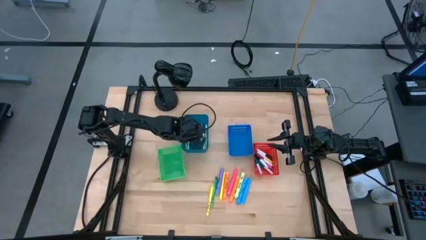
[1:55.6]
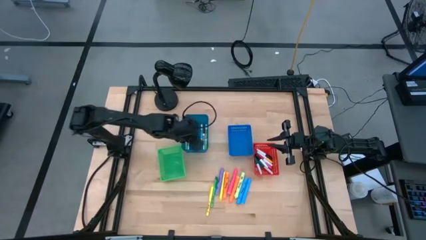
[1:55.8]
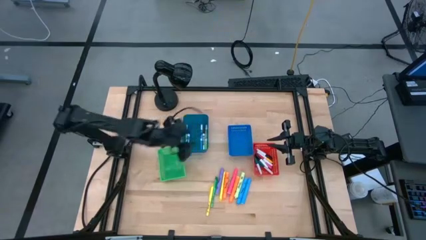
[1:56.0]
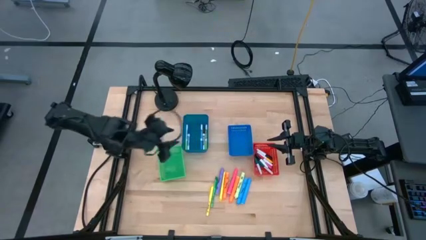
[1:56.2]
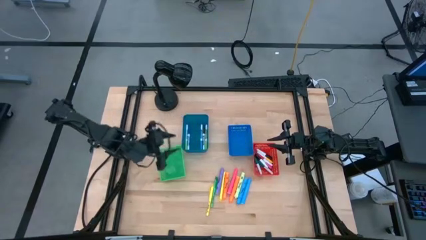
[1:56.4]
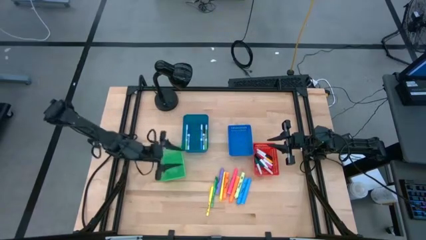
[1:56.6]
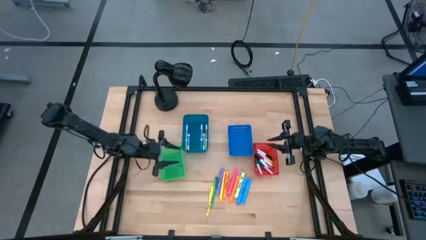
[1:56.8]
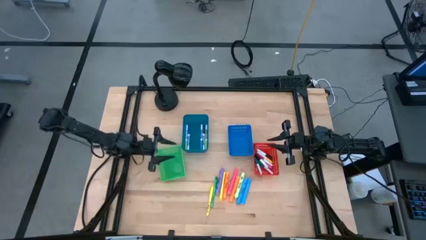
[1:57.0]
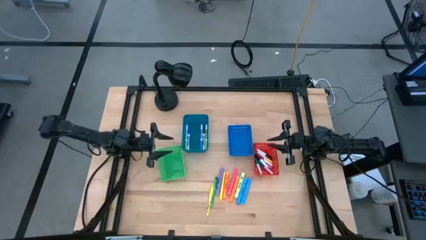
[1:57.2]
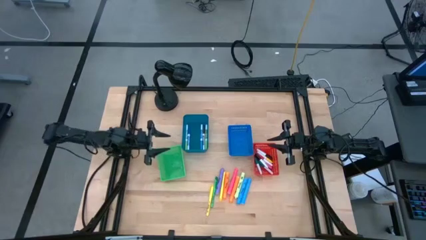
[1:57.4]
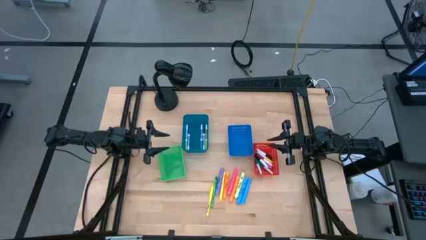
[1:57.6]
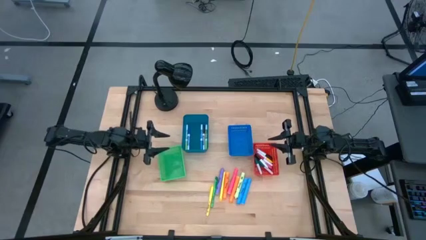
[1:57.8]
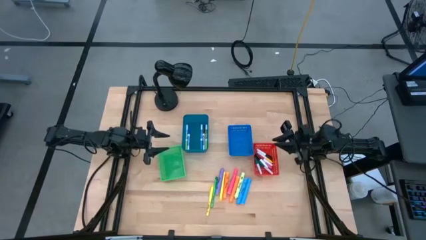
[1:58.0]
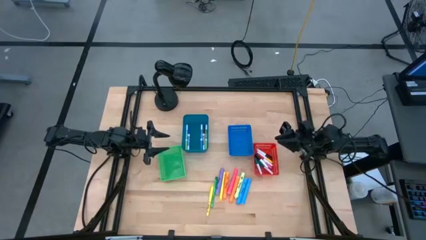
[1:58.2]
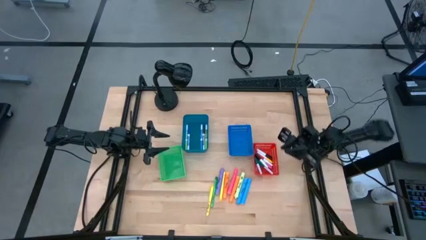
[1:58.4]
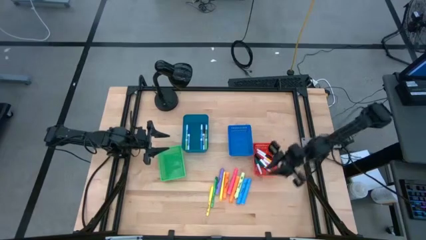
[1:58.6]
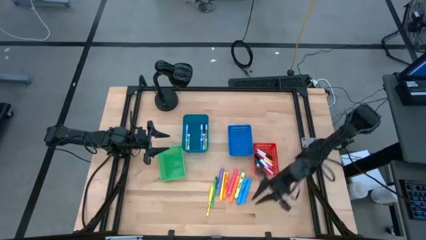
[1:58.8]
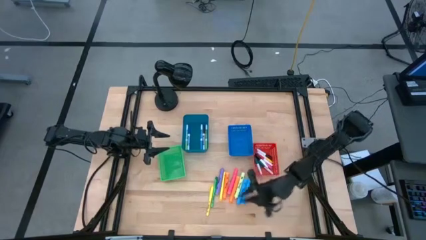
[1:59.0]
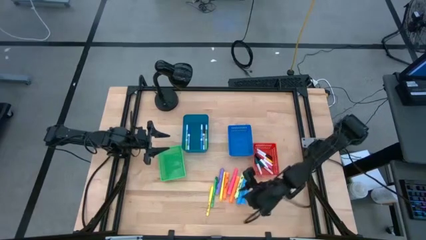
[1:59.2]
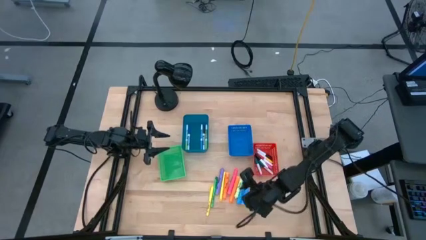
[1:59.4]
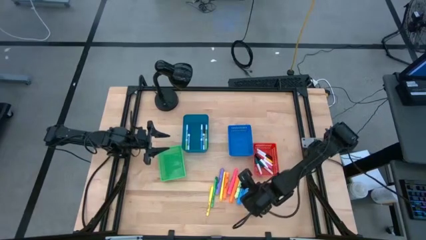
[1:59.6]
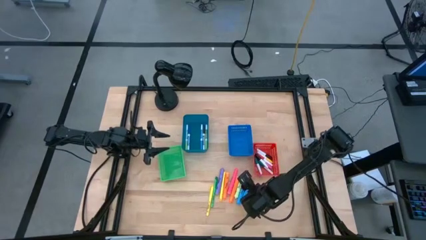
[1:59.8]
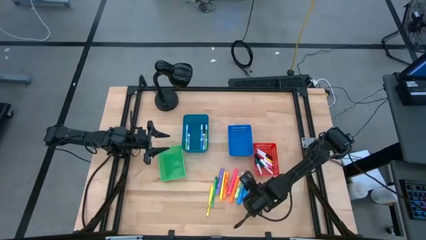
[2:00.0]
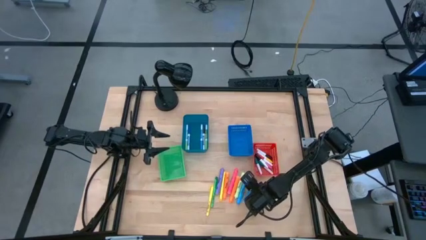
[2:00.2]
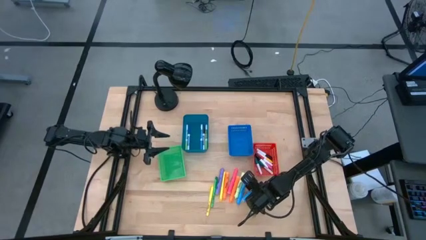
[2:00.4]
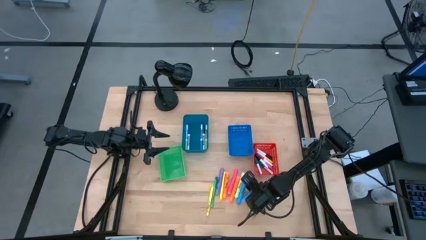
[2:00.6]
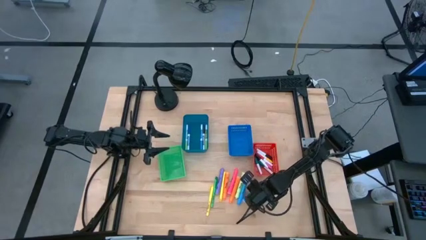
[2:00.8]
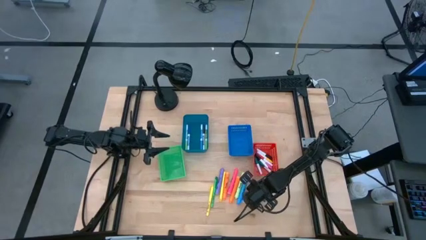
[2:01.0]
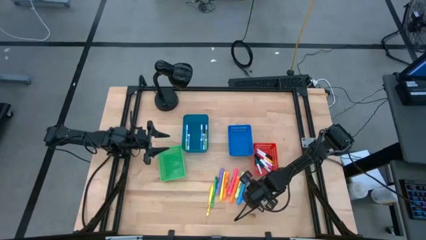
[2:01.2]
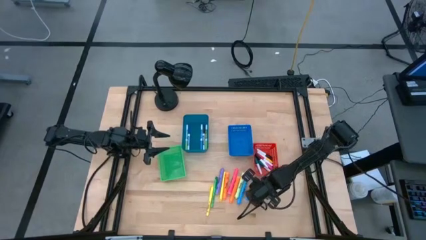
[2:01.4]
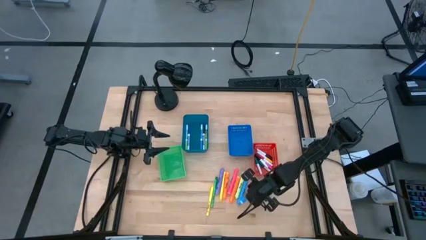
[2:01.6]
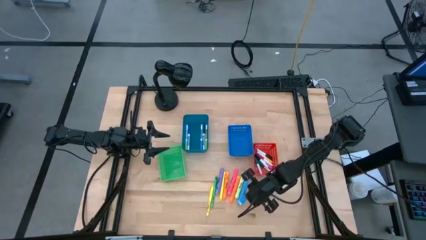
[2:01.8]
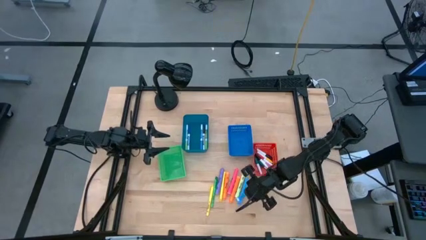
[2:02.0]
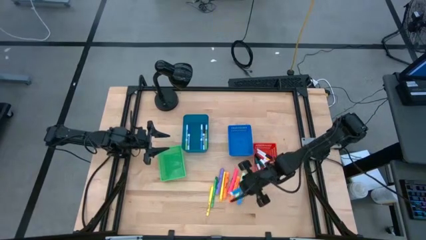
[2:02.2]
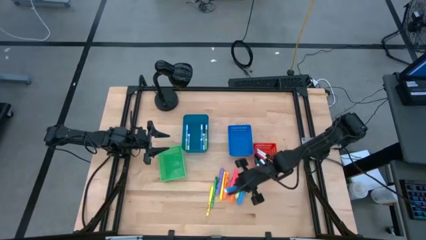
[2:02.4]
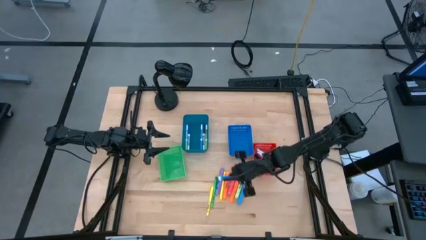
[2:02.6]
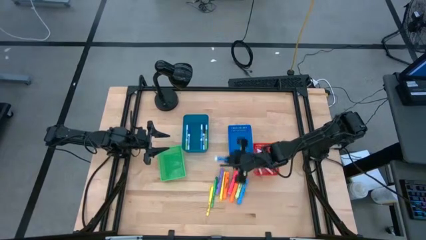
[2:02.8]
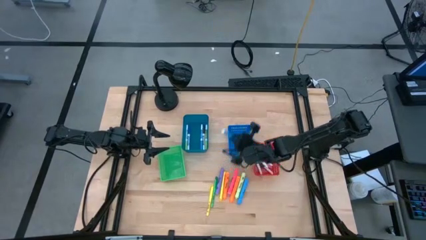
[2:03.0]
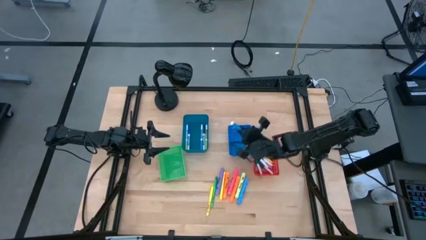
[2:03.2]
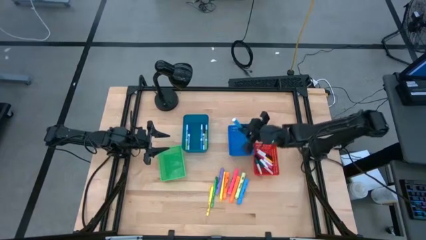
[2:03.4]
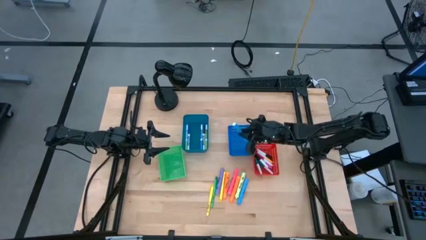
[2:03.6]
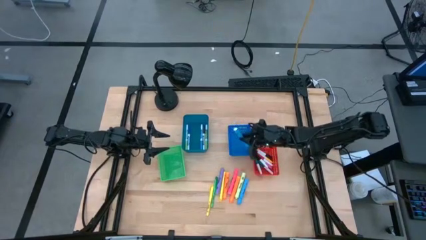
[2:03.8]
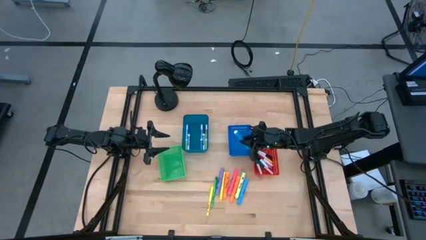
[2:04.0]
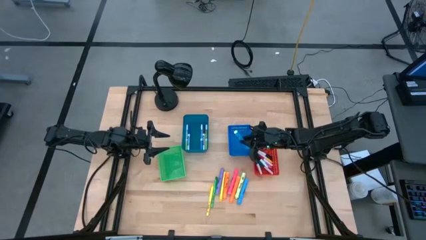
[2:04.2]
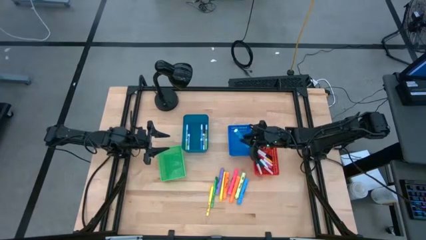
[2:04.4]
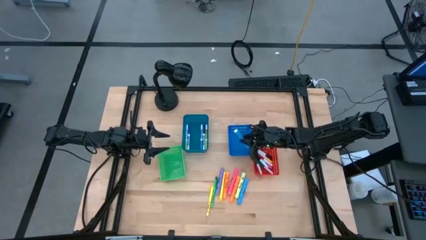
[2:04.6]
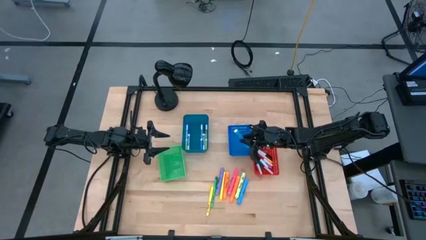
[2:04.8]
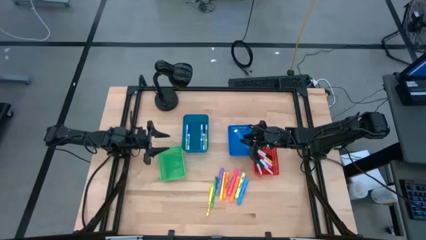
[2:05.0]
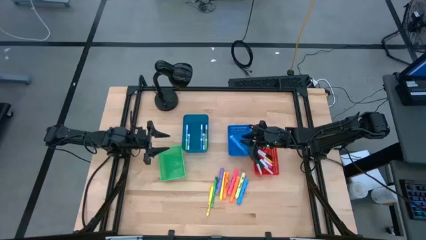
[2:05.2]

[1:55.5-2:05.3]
Task: Pick & Place Markers
Put the right blue highlighter pen into the blue bin

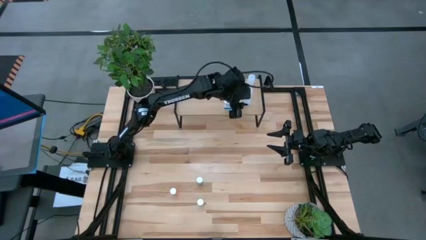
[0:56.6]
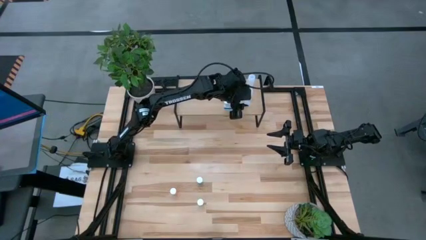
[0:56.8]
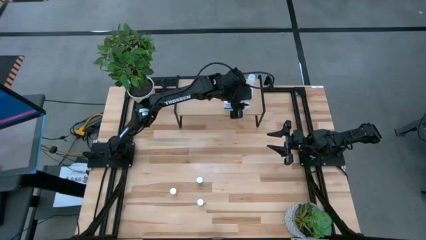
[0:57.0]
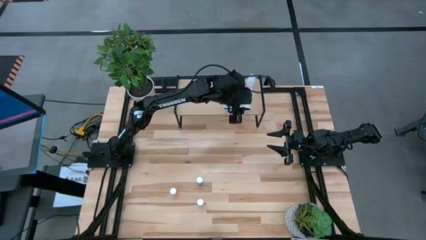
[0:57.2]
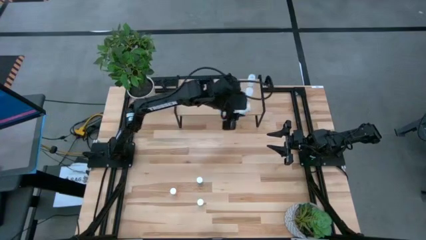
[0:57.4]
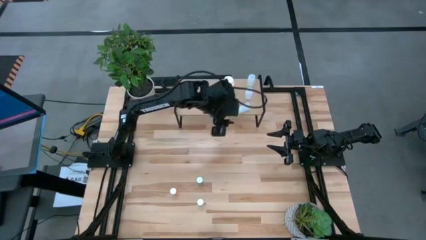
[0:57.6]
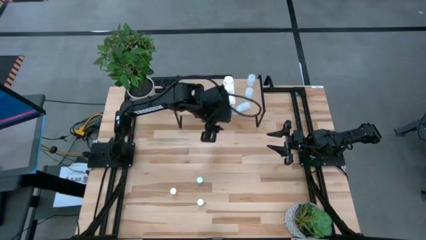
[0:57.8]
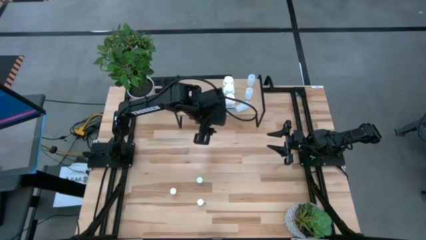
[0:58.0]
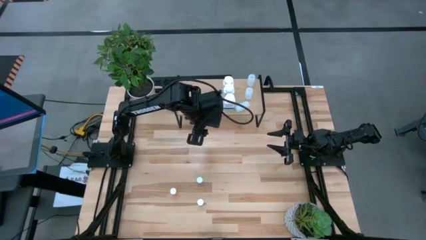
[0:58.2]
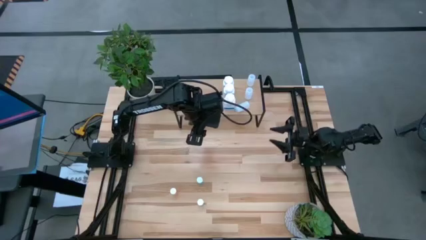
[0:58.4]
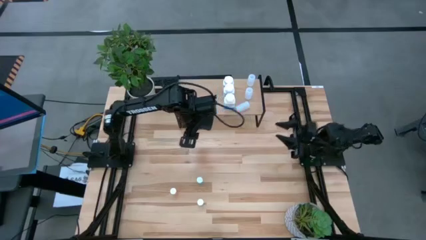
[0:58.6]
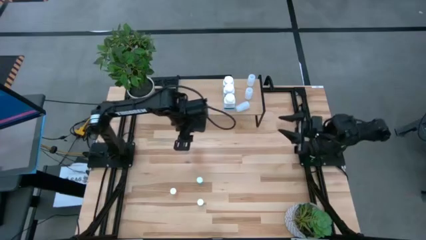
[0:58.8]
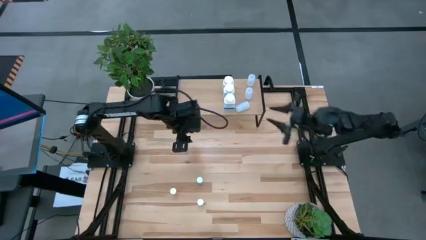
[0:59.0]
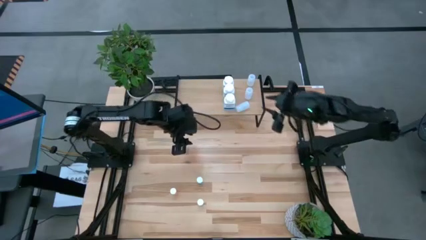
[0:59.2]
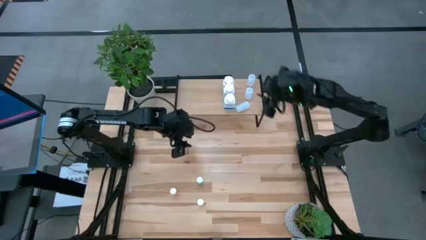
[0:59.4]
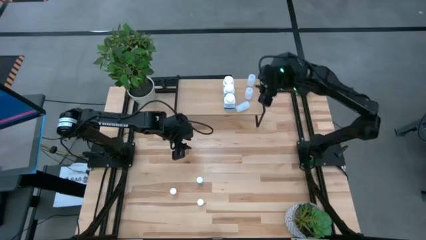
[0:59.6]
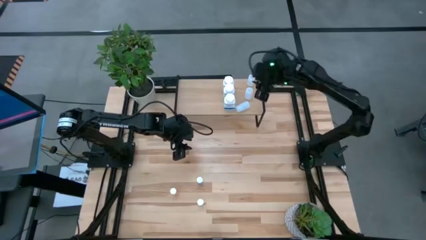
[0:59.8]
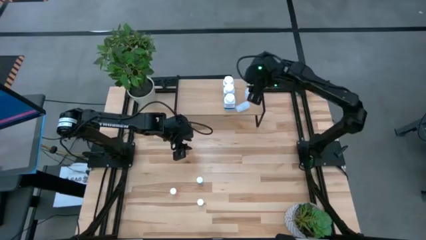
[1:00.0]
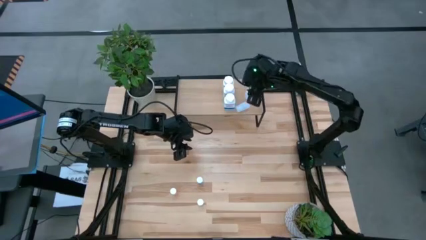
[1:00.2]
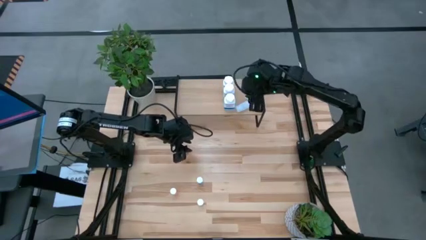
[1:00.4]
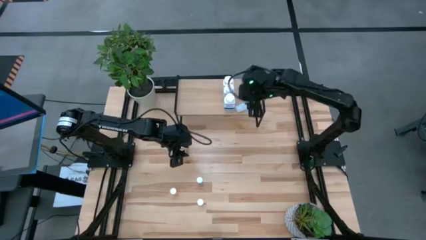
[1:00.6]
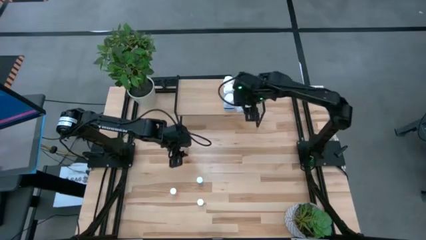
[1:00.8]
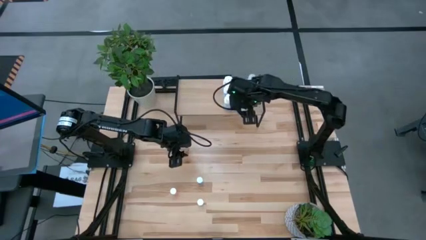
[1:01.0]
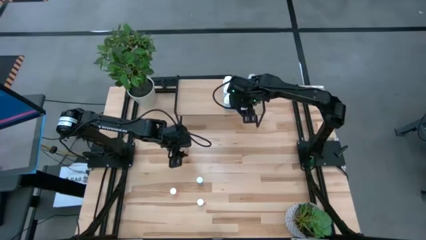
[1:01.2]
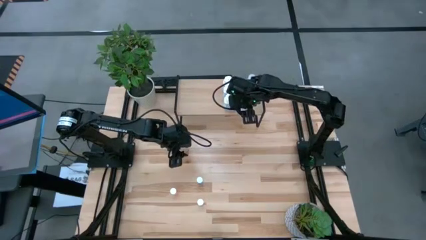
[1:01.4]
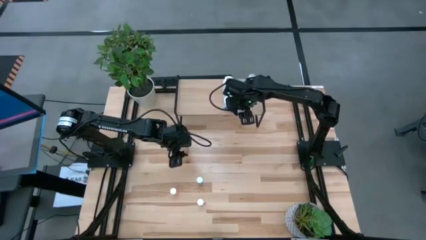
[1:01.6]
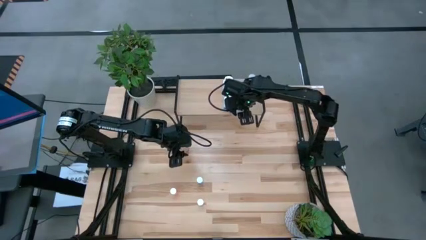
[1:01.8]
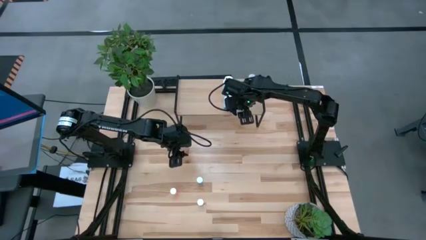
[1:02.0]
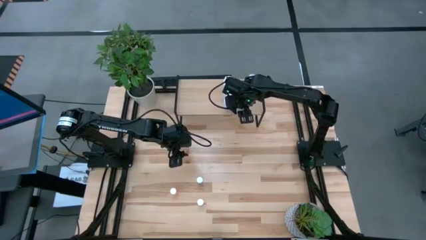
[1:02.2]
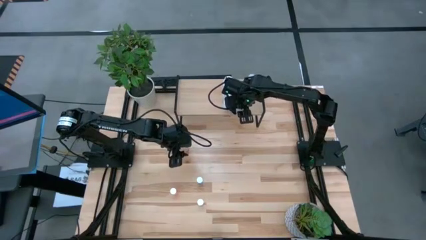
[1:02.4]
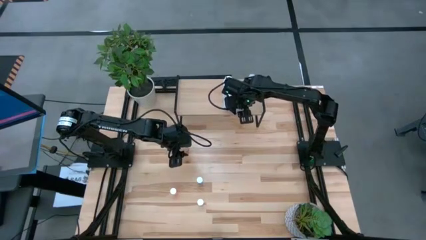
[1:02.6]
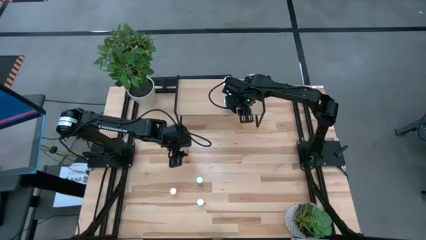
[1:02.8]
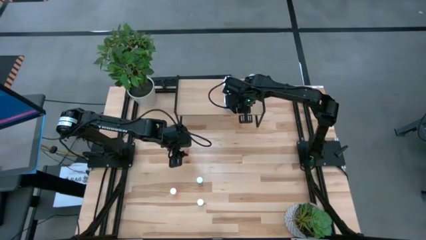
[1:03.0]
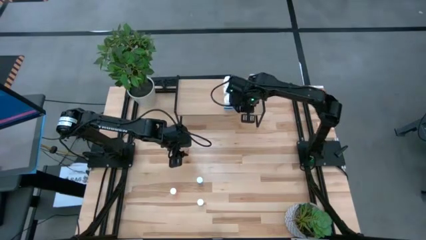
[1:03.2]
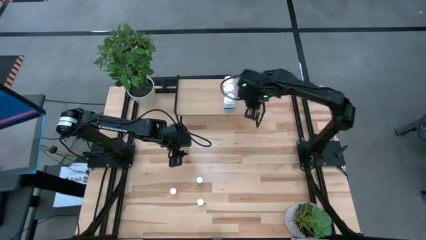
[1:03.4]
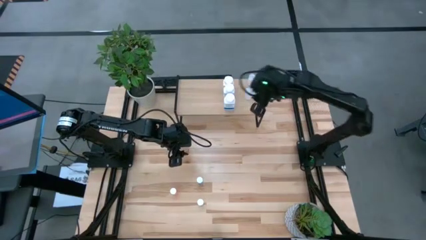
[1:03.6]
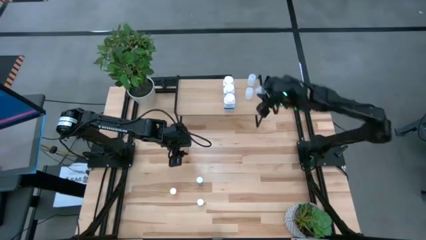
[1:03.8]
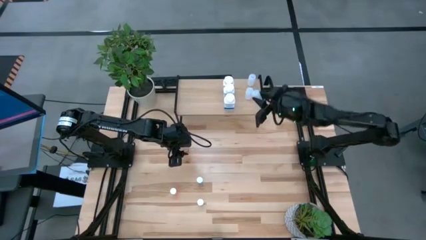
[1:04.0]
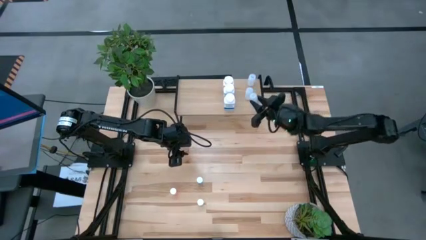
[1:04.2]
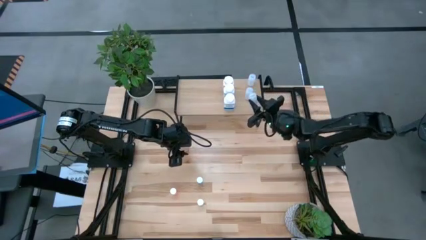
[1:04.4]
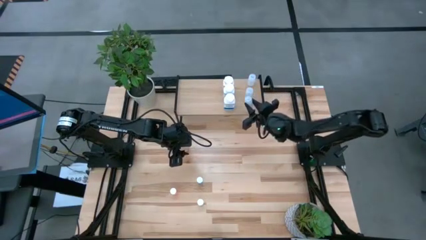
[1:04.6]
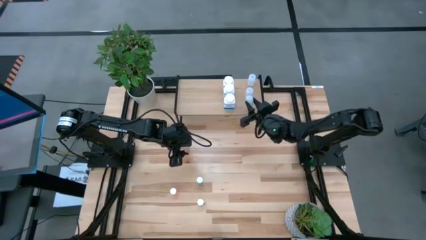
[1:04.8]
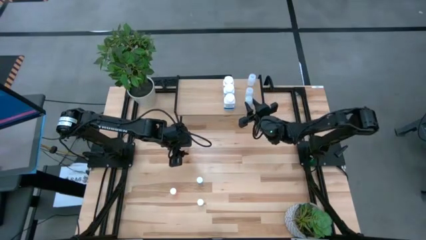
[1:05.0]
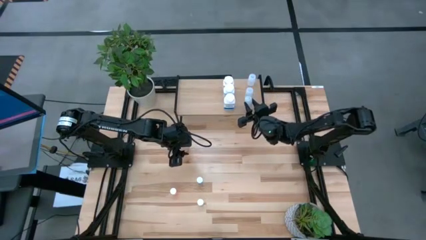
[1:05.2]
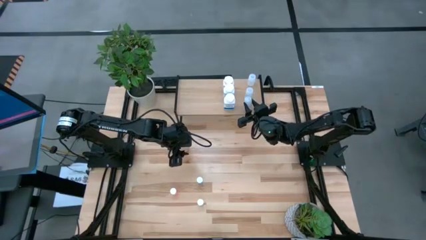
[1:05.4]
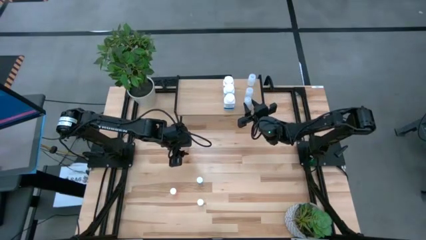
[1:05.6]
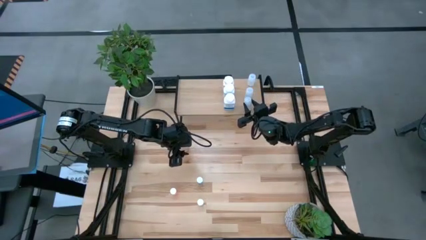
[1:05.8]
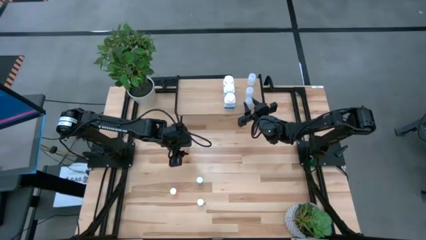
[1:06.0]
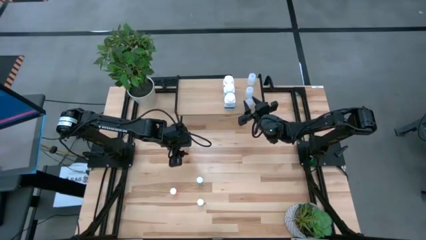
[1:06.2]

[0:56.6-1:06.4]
Task: Pick and place medicine bottles onto shelf by color
Align the white transparent bottle with the other white transparent bottles on the shelf
